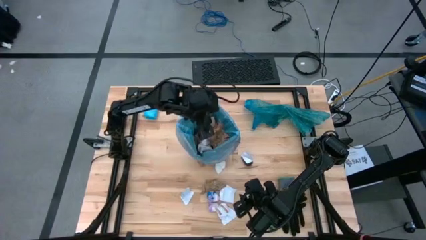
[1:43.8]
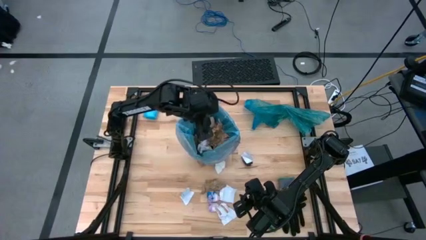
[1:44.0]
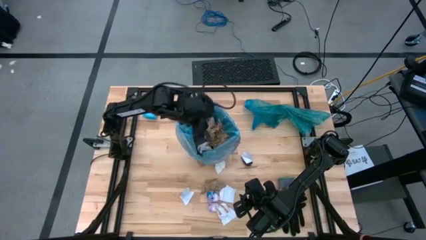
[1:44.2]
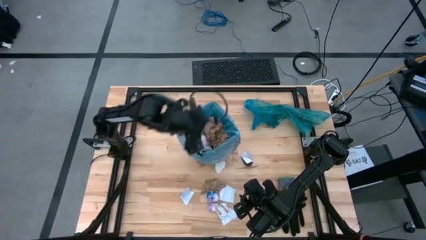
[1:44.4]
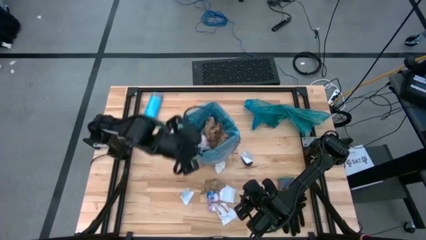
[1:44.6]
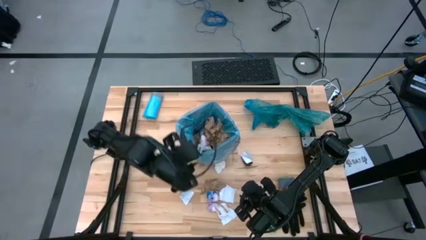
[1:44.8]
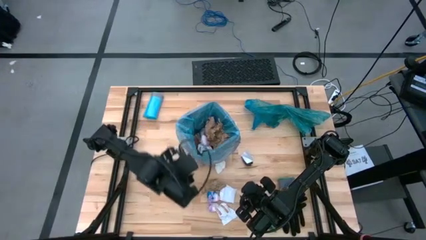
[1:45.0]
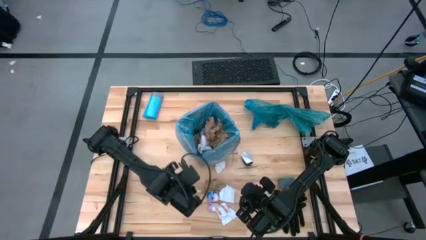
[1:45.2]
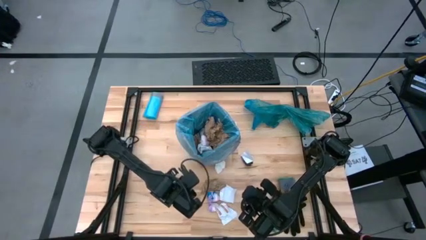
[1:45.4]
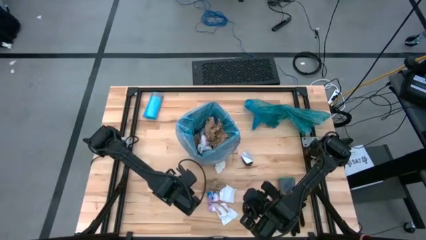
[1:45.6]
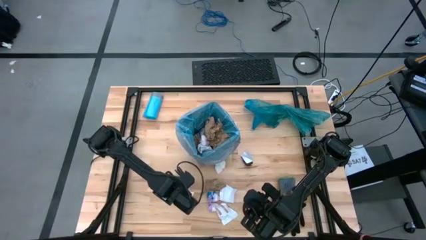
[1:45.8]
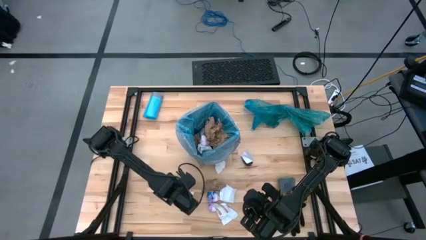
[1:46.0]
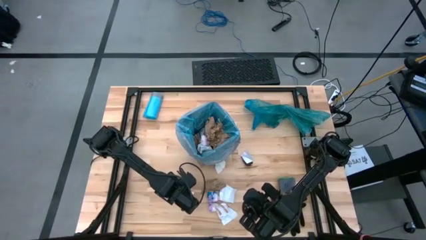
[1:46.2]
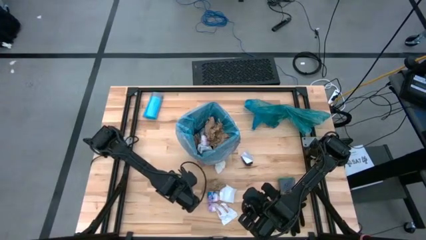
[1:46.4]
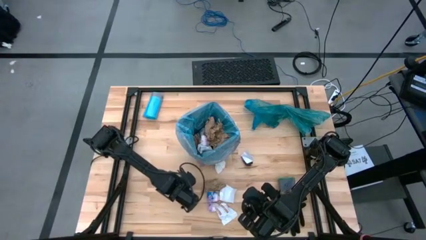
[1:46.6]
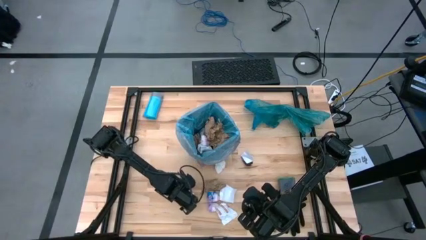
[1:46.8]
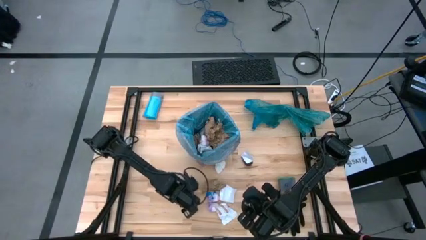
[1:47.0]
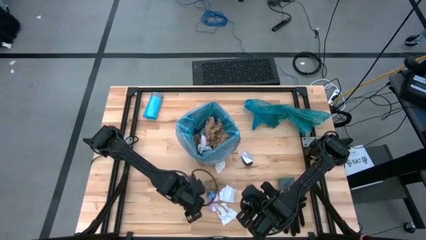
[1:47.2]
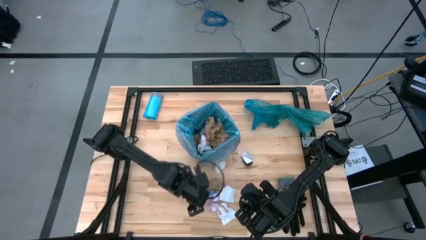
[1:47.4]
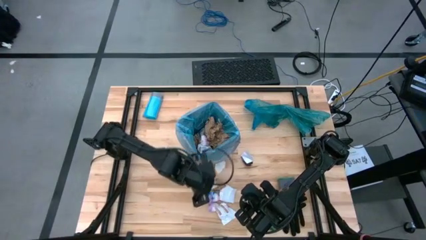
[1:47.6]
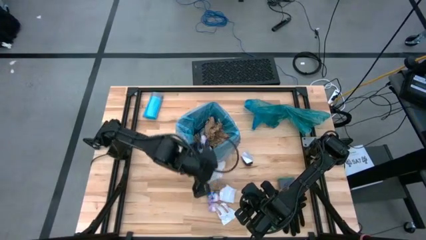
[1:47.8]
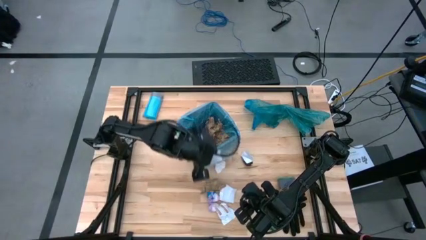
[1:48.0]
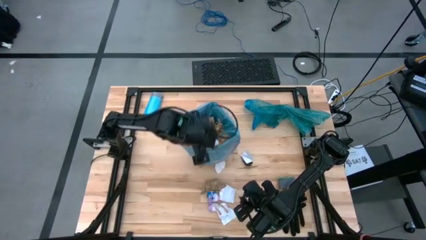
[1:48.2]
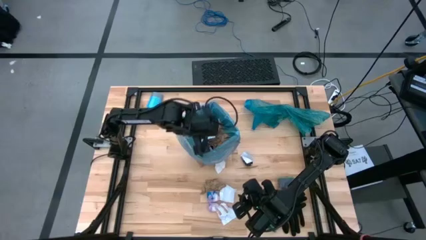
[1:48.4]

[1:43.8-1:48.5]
Task: place trash/remove bag and relplace
Put the white paper trash into the trash bin

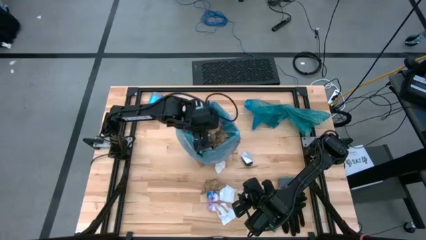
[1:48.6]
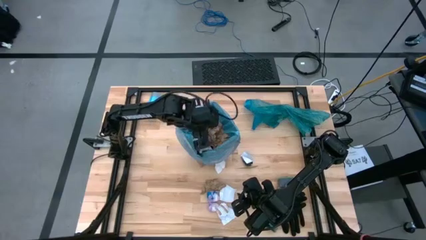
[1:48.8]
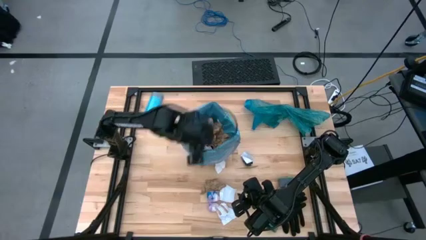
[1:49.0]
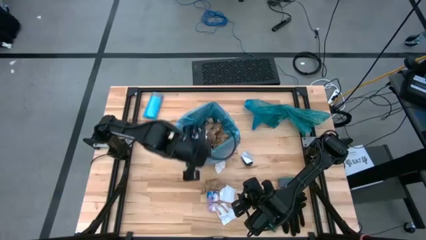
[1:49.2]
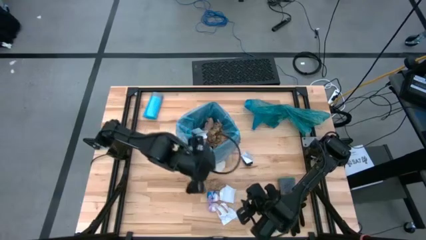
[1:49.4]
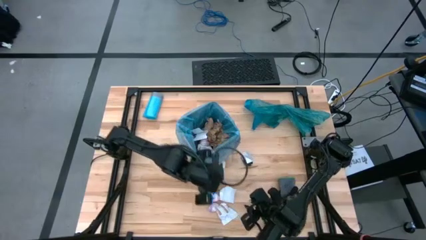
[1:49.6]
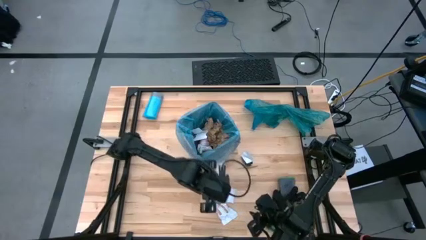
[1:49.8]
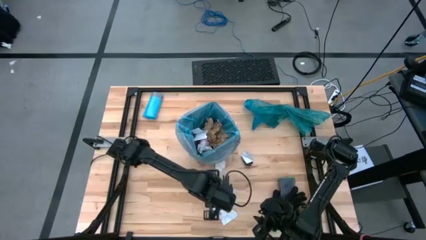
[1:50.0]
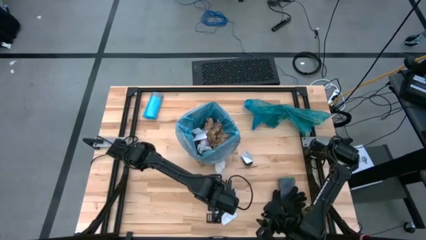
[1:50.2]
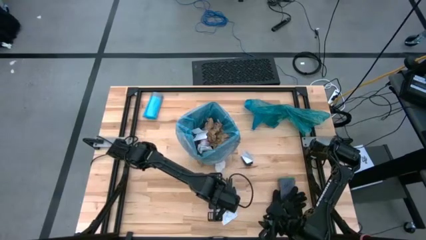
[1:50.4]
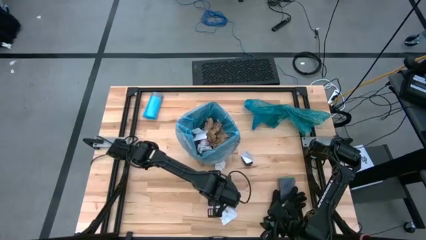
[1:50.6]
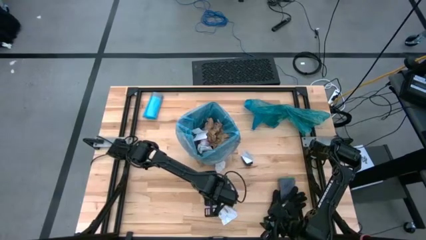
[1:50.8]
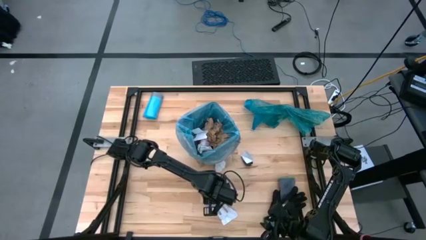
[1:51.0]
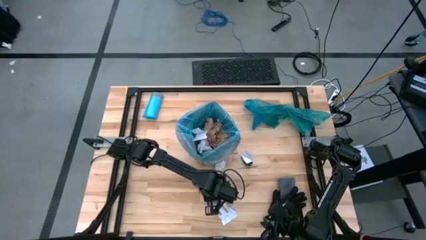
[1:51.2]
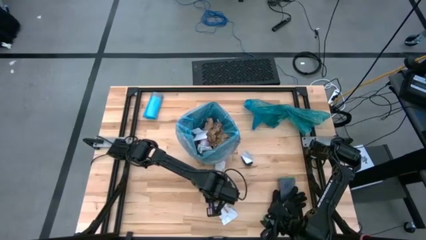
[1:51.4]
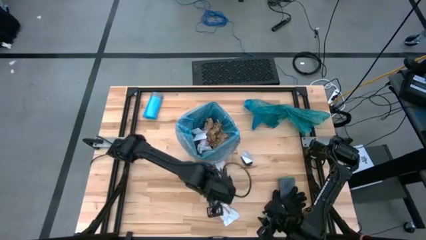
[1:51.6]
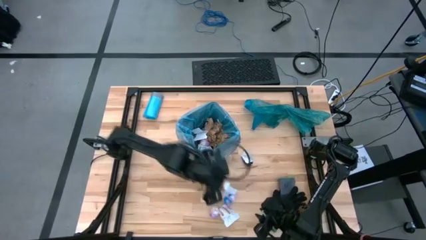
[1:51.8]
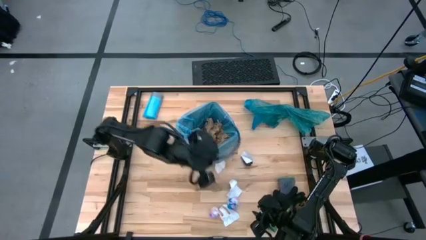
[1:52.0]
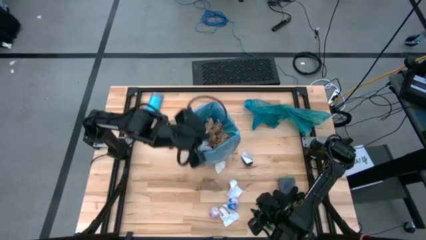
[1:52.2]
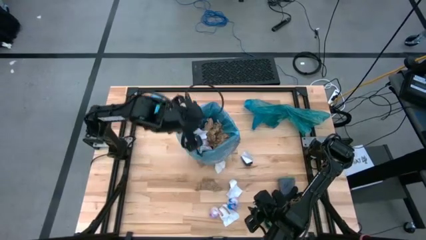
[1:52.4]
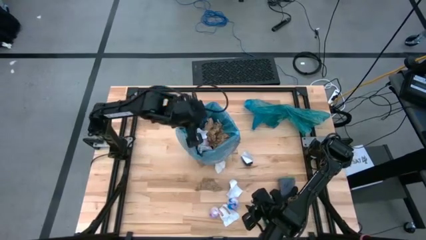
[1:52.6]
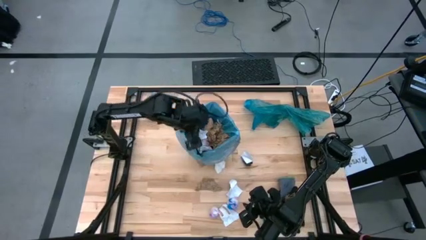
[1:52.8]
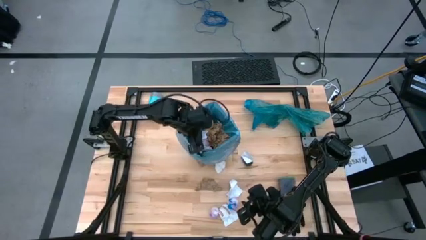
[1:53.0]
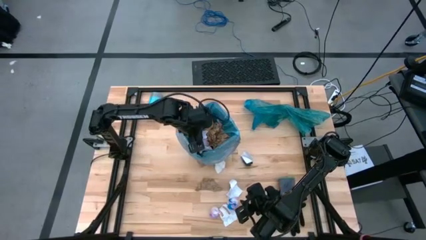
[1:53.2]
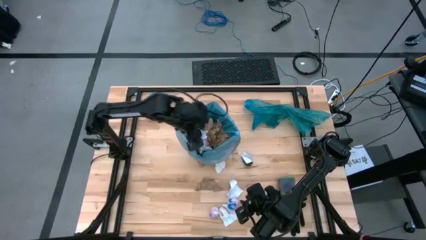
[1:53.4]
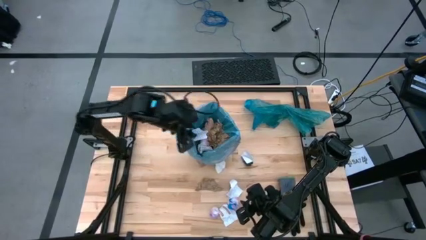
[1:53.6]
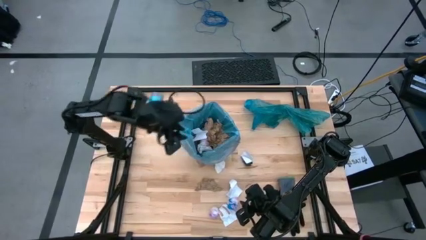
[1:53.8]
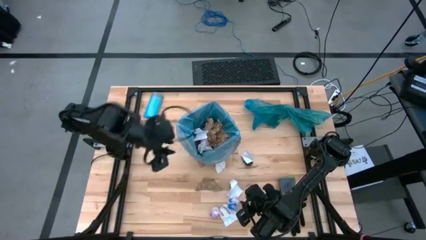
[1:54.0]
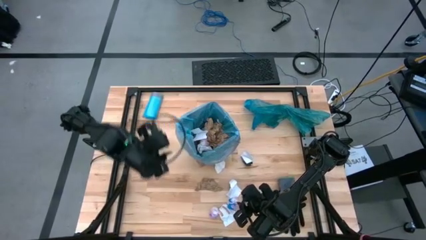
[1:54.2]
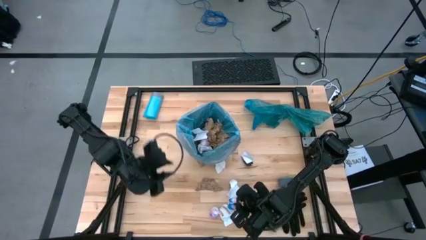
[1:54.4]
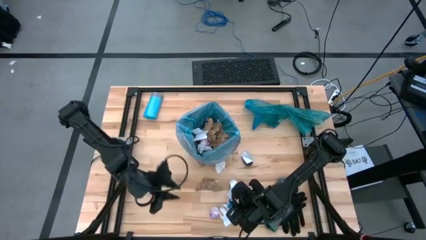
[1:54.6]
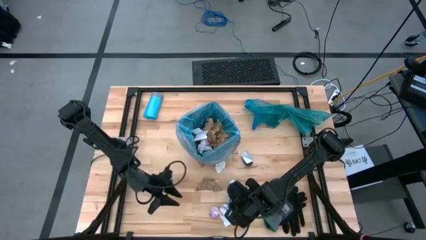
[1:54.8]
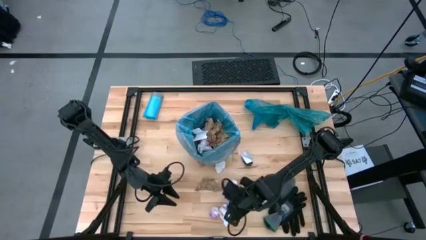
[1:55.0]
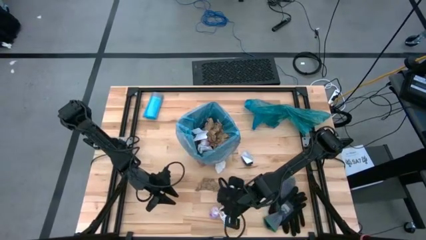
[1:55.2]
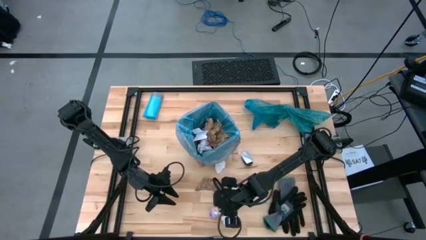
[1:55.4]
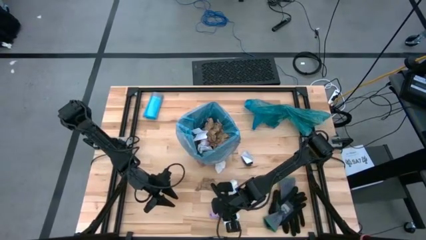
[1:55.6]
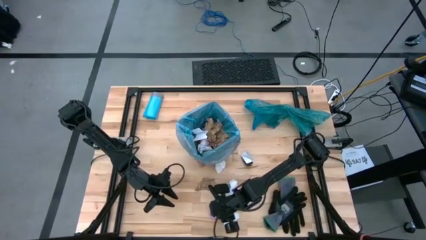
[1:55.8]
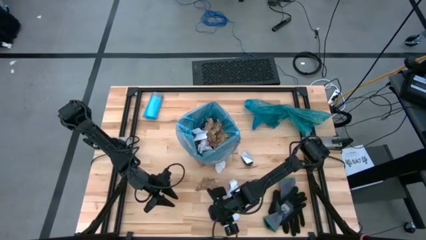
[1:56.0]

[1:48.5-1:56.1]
Put the pink plastic trash into the trash bin

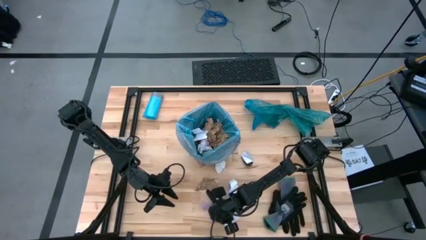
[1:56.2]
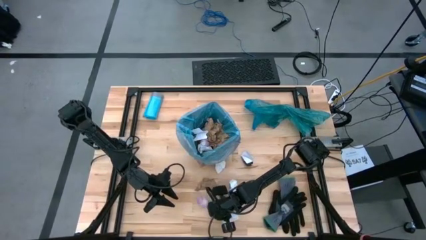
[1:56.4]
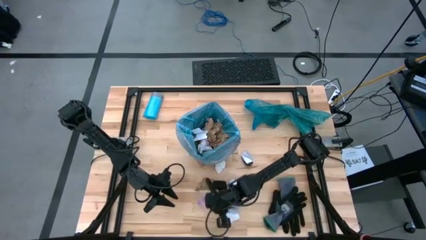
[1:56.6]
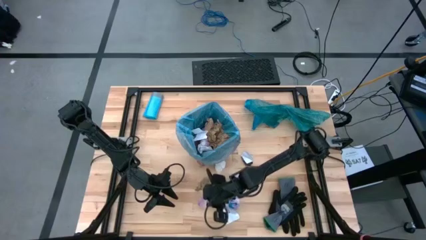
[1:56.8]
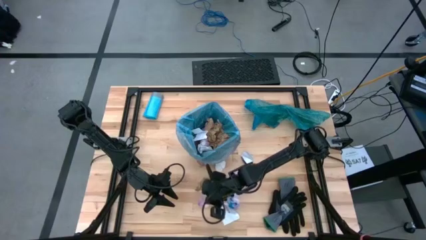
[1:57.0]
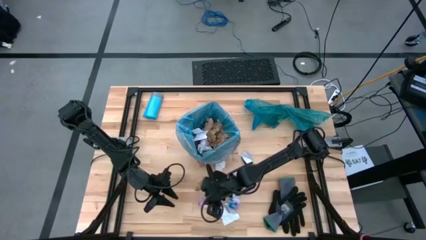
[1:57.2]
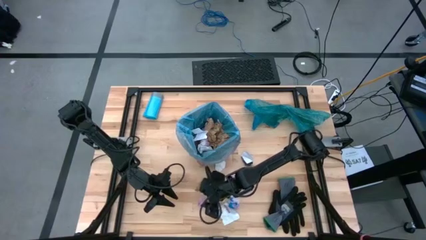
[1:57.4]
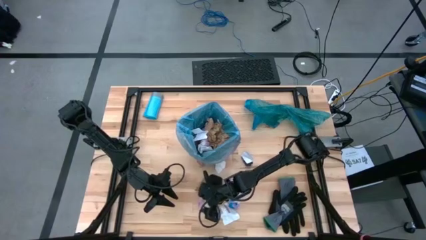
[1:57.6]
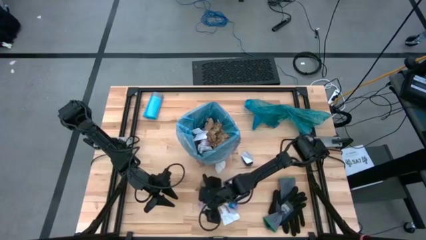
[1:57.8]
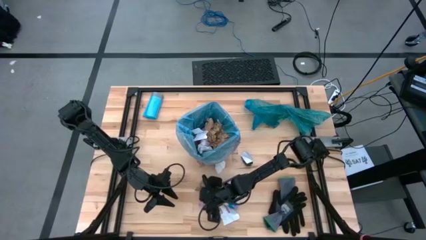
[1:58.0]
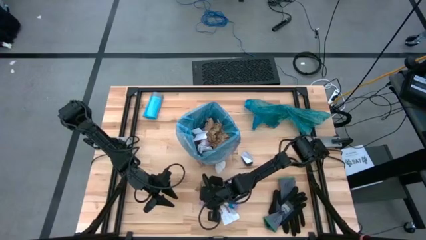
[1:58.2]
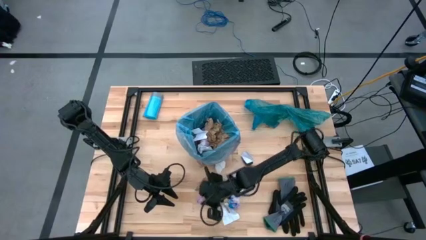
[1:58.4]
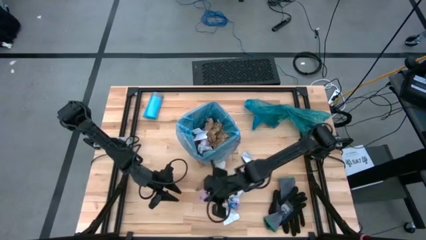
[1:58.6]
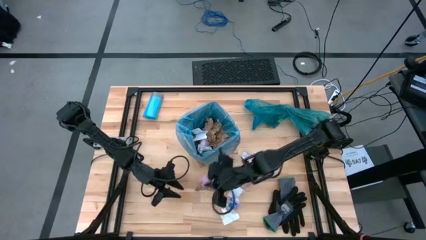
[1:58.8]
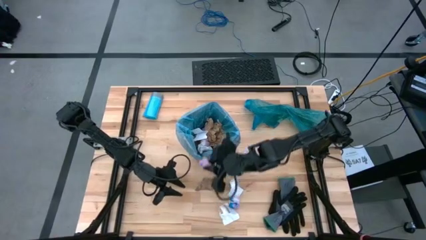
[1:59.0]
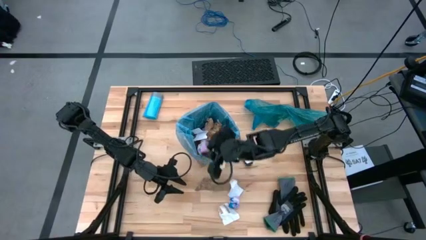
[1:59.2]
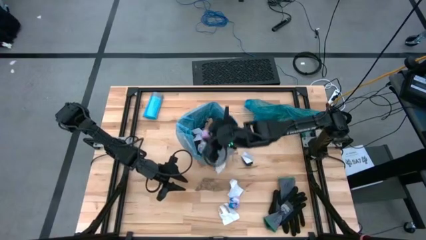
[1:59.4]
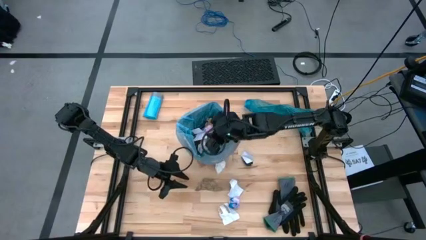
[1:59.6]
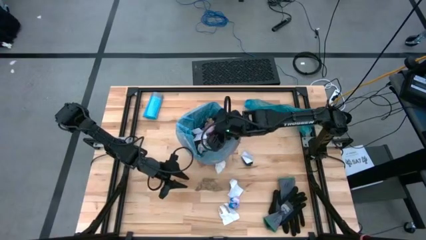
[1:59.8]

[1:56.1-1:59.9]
Put the pink plastic trash into the trash bin
